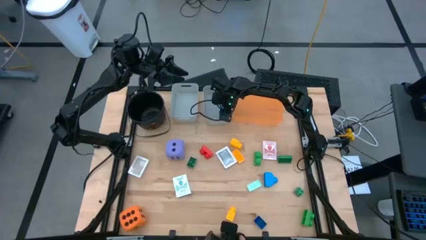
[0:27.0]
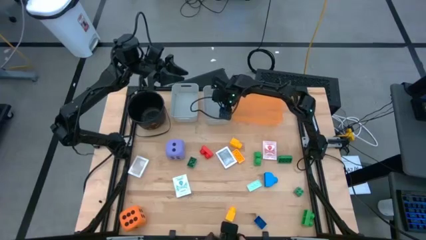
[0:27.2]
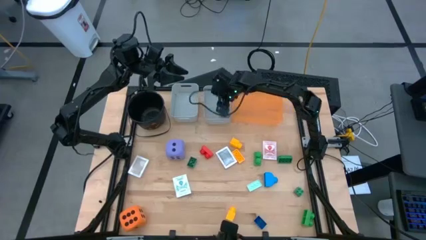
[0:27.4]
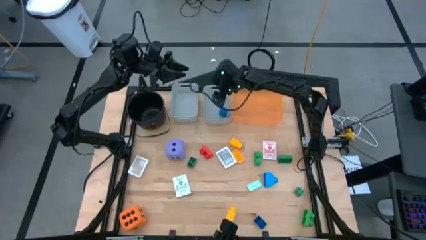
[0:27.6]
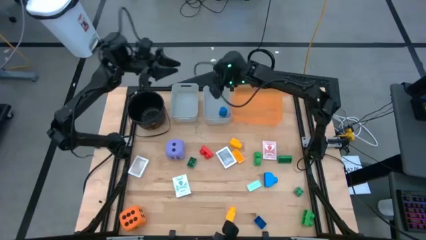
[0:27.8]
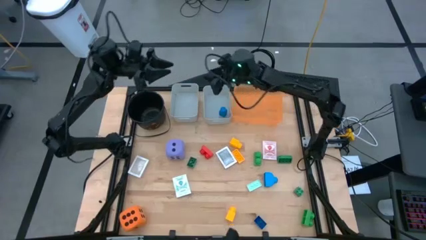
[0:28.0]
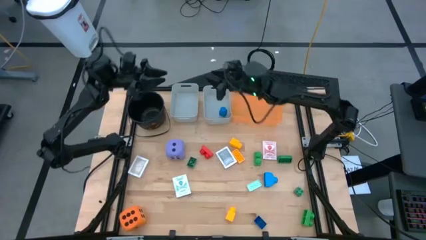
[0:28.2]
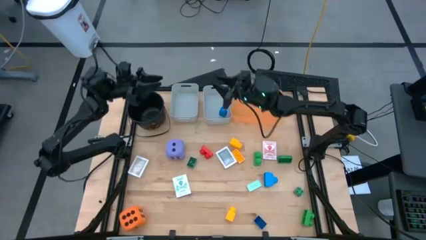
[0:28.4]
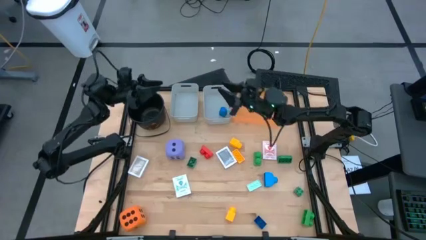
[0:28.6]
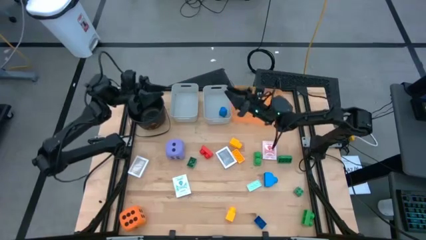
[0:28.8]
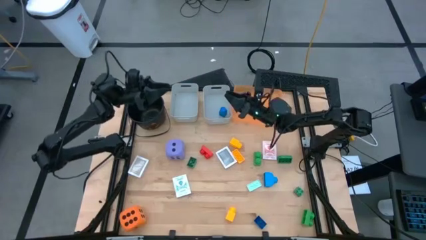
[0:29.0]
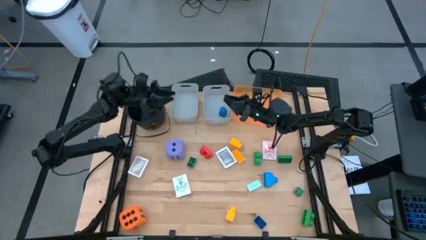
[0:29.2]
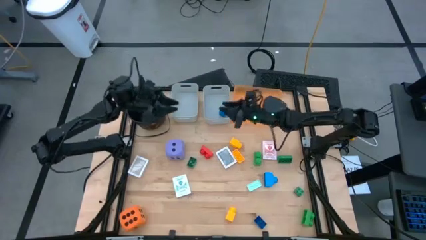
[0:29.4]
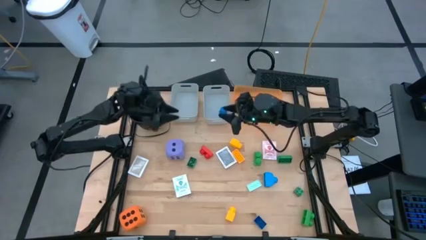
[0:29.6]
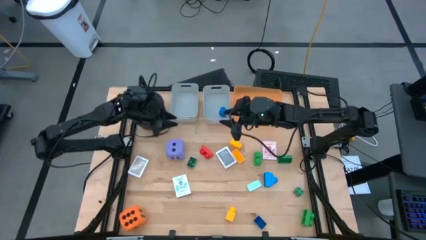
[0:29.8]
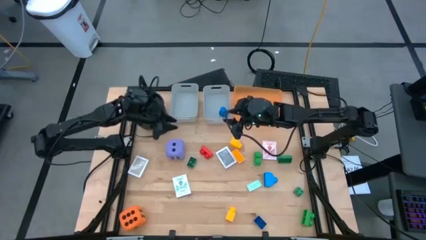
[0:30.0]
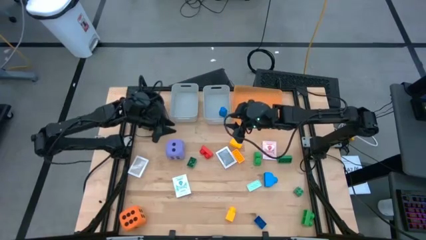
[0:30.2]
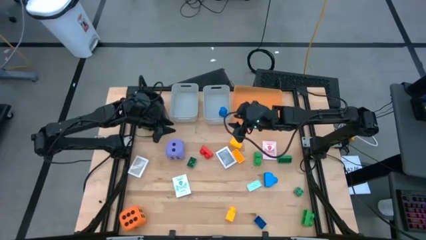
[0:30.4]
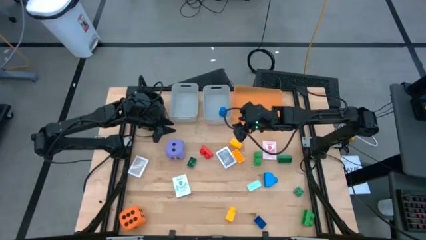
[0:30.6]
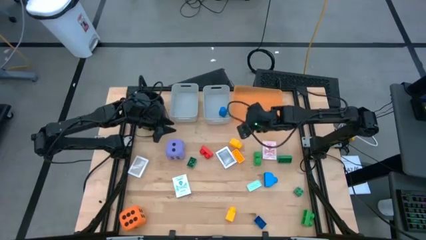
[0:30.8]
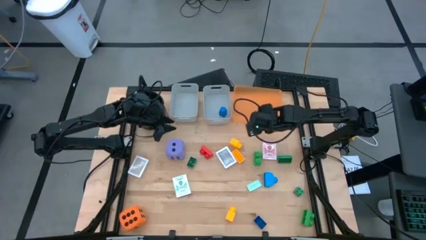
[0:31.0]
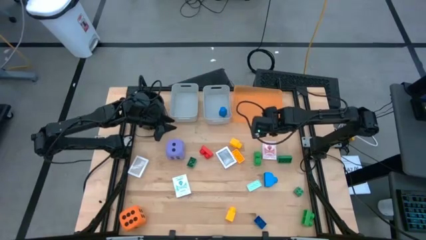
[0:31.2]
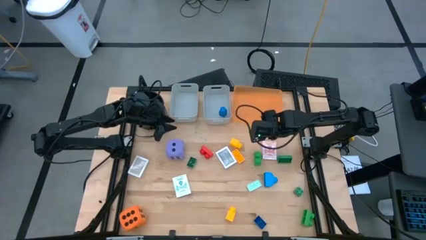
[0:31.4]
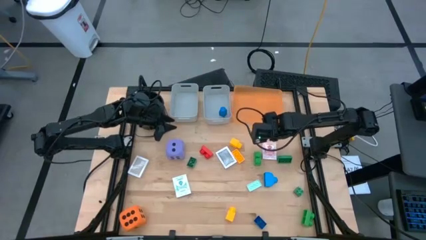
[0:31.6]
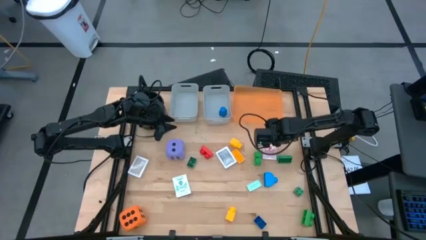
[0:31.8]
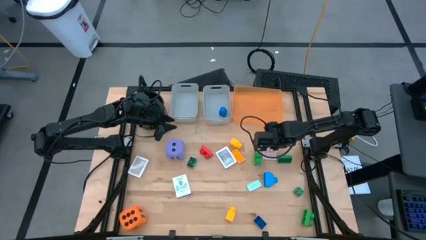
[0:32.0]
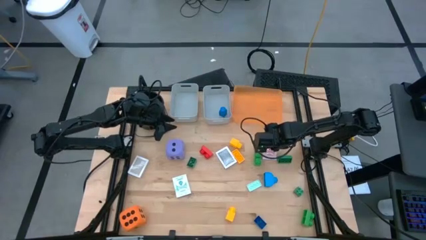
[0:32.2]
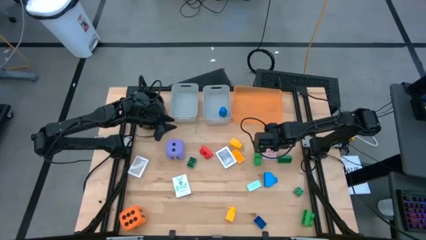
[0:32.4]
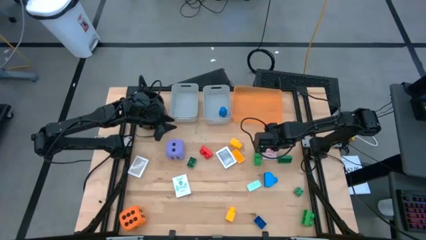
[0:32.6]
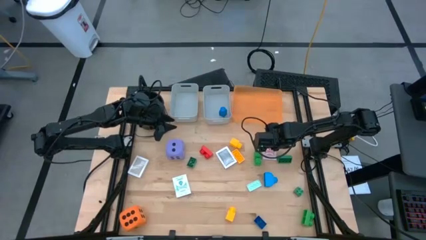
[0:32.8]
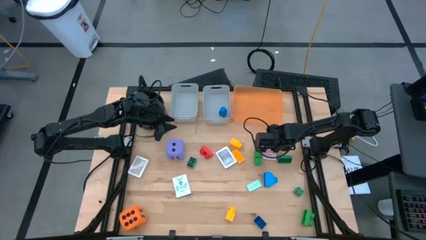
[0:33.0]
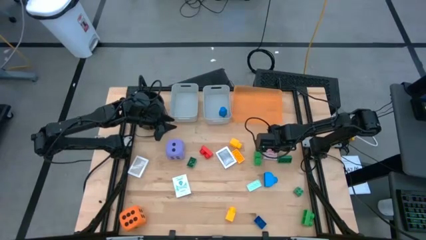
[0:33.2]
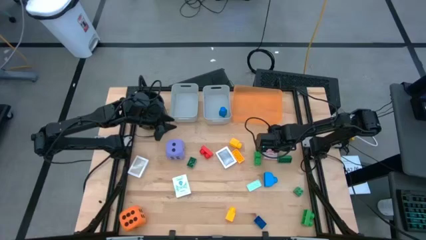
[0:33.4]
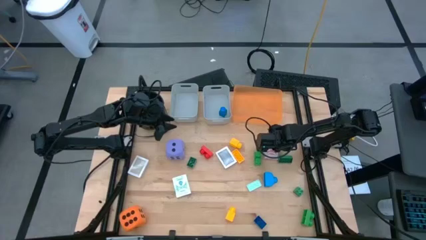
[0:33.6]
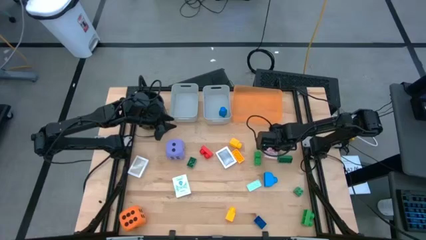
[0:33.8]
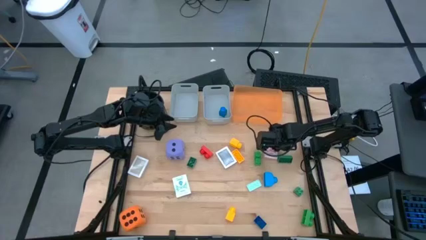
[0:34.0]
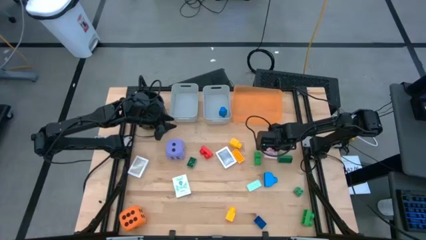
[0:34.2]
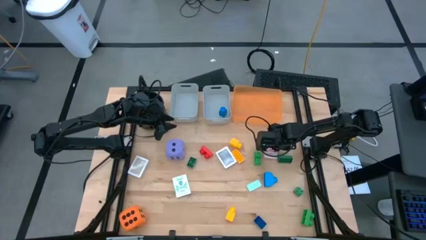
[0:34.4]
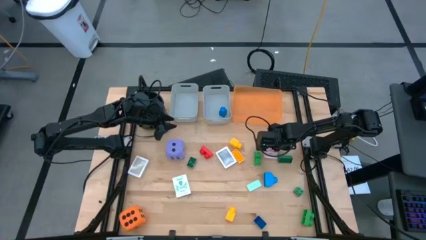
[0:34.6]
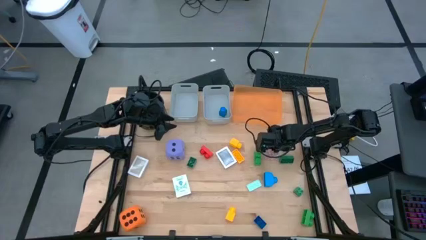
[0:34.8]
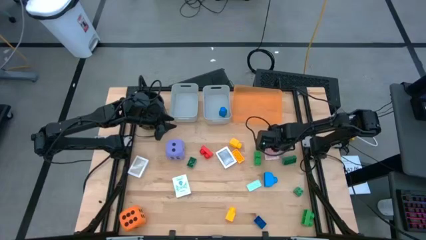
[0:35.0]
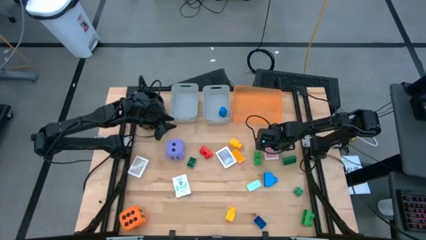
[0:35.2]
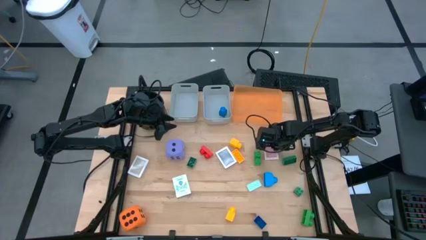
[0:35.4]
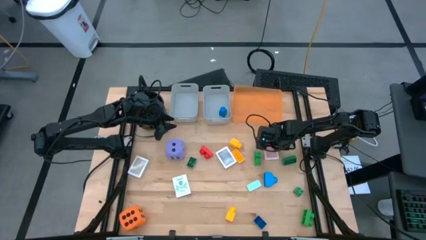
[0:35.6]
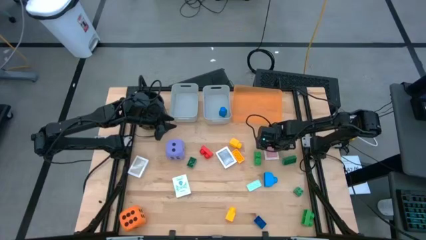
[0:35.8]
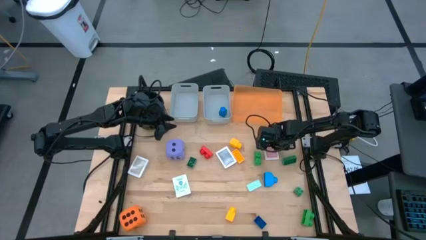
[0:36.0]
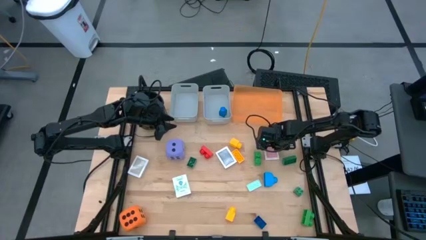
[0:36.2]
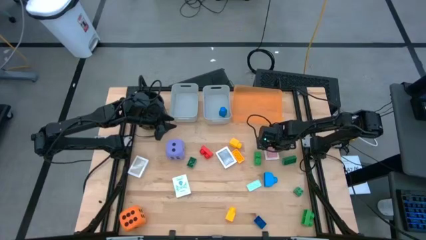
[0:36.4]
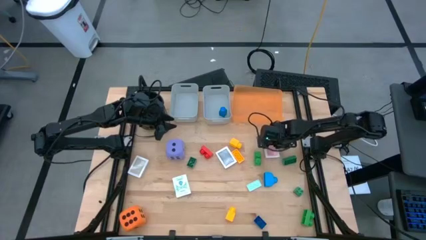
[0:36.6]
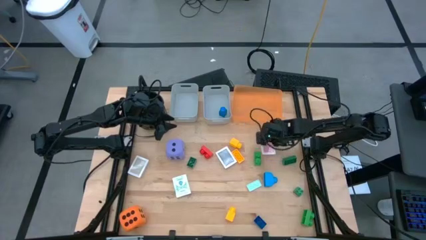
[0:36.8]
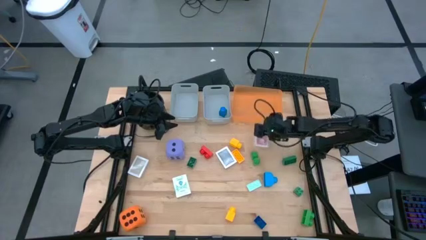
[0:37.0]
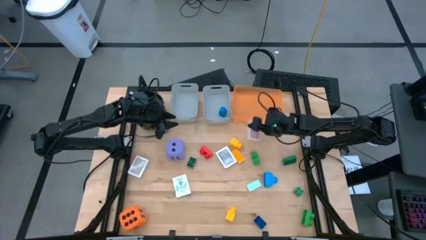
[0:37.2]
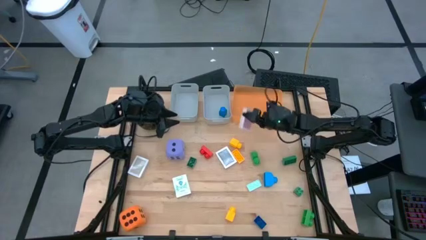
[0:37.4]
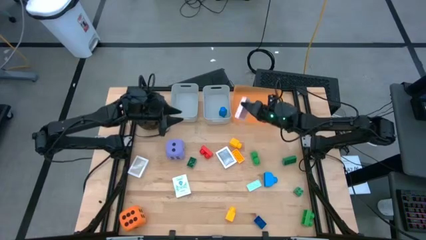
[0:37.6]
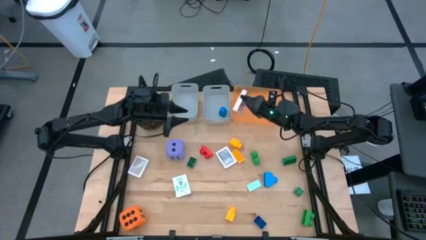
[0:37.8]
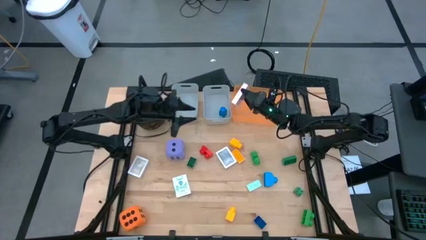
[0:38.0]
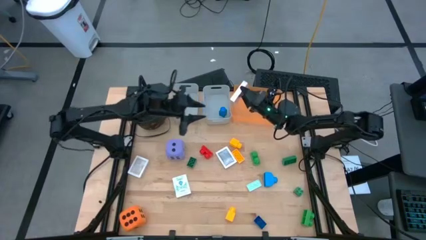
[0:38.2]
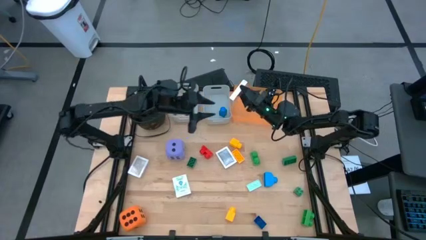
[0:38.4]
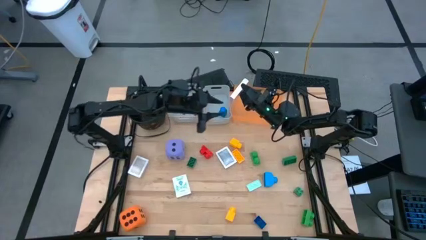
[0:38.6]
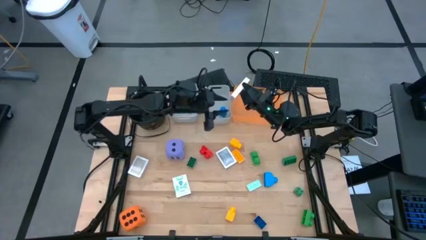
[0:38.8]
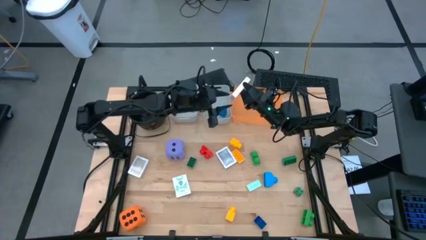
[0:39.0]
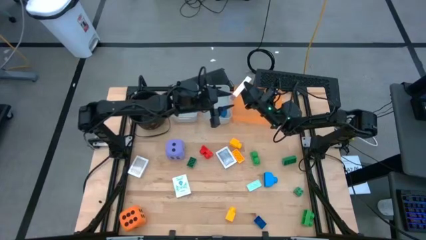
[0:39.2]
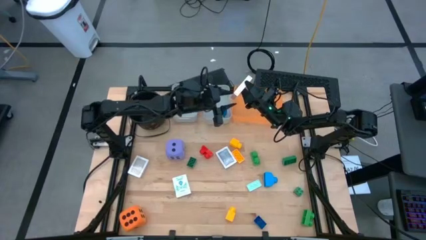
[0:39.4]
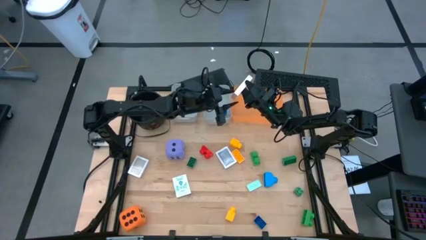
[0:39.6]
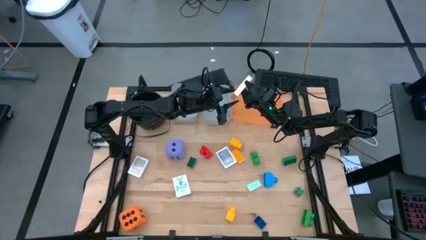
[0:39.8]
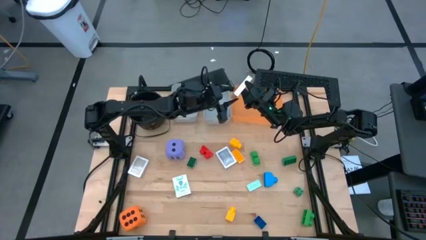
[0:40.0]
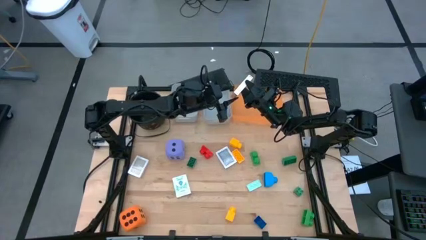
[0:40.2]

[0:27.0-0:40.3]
Task: Pick & Place Toys
Put the red playing card into the orange bin
